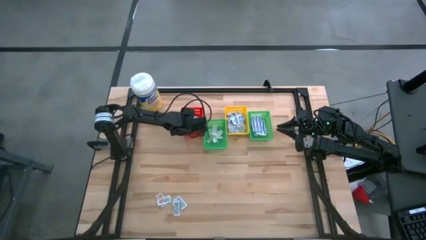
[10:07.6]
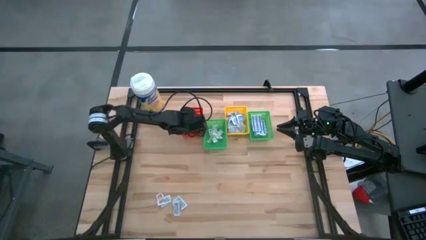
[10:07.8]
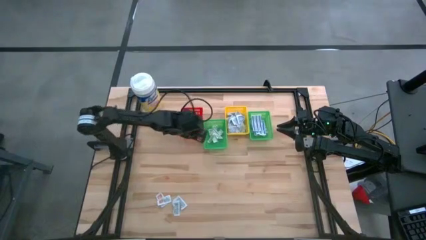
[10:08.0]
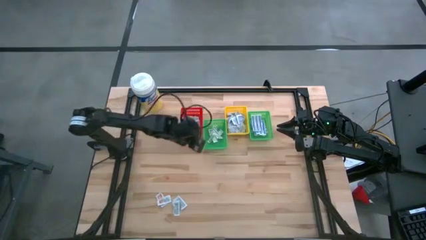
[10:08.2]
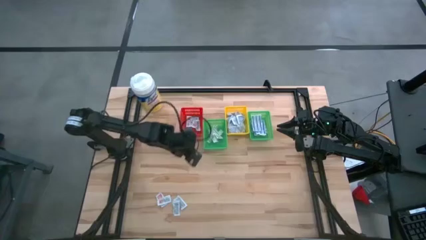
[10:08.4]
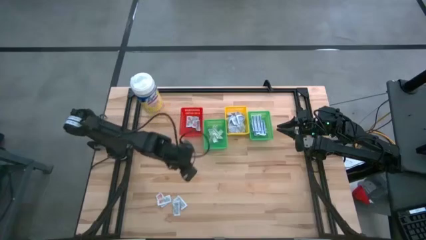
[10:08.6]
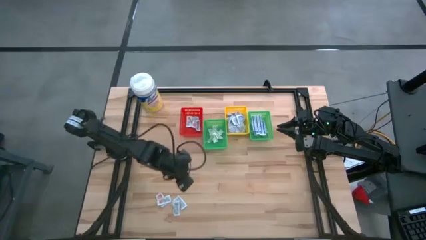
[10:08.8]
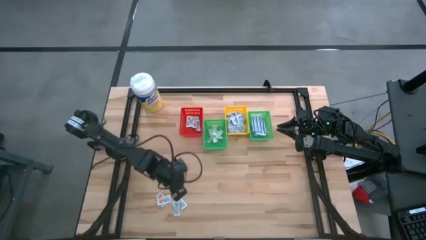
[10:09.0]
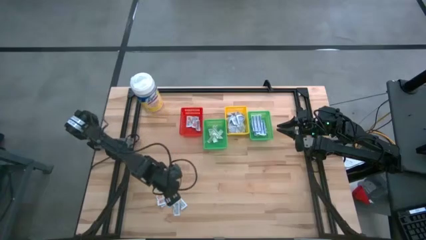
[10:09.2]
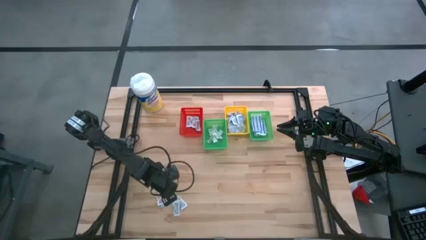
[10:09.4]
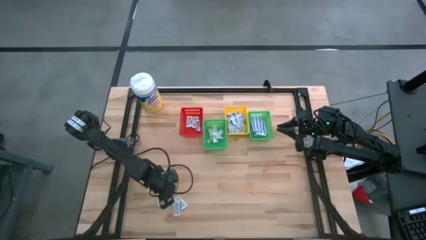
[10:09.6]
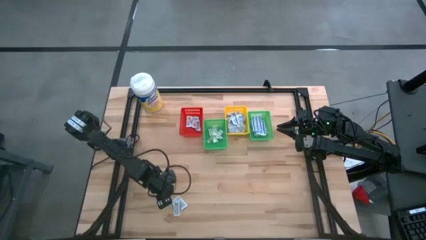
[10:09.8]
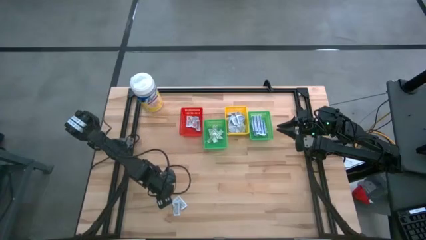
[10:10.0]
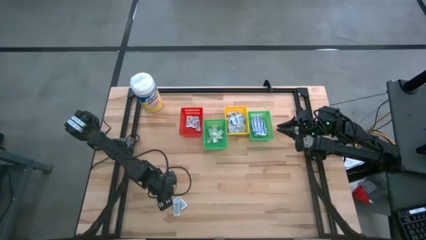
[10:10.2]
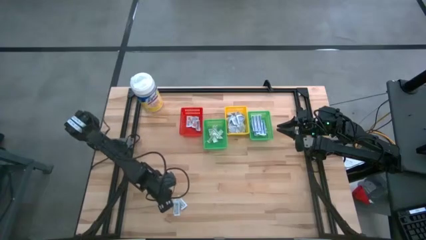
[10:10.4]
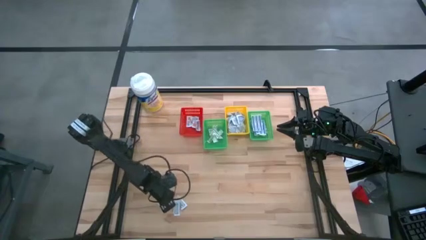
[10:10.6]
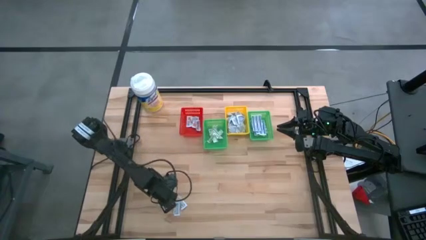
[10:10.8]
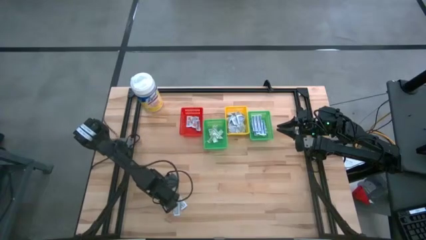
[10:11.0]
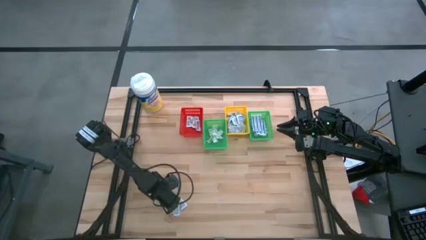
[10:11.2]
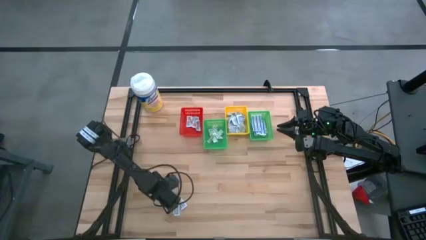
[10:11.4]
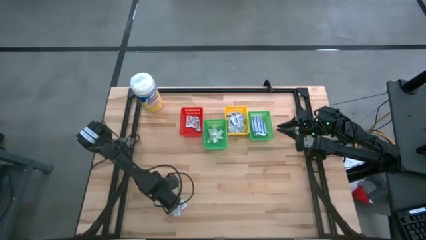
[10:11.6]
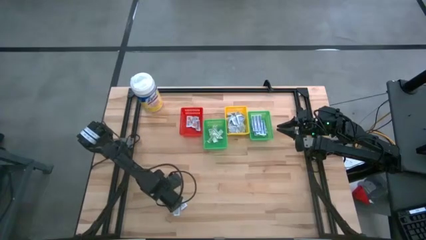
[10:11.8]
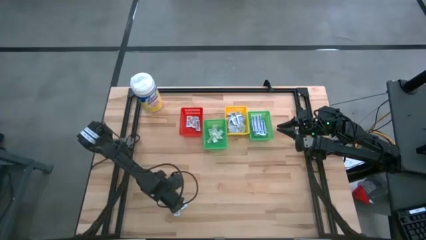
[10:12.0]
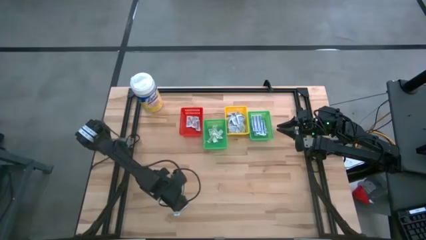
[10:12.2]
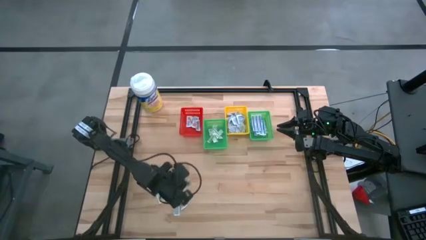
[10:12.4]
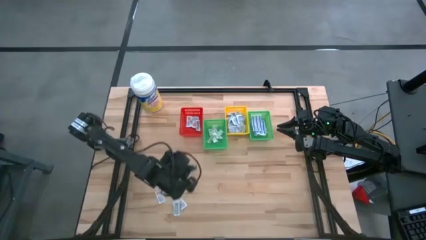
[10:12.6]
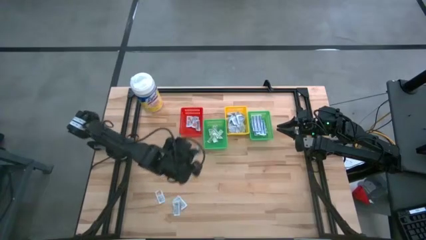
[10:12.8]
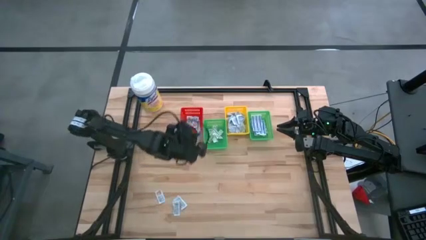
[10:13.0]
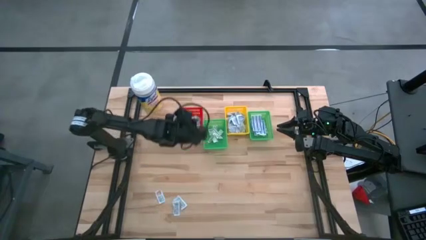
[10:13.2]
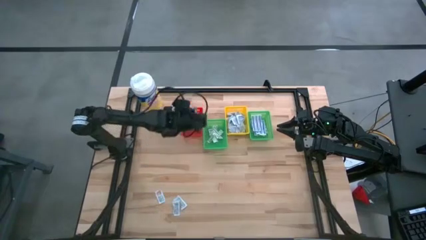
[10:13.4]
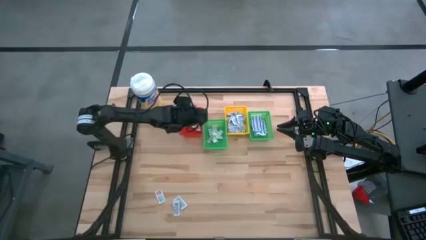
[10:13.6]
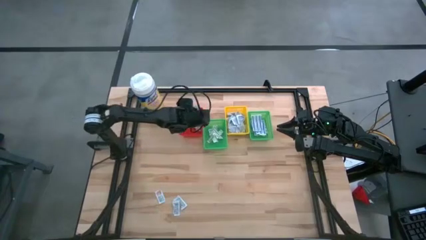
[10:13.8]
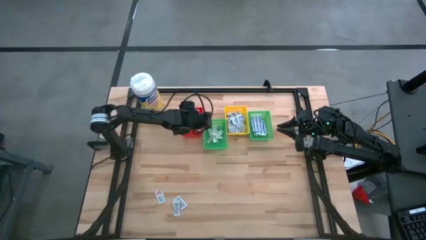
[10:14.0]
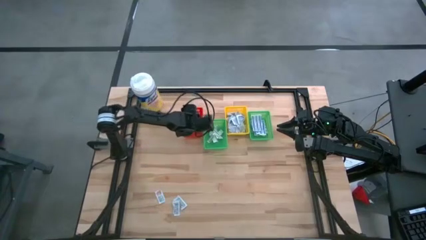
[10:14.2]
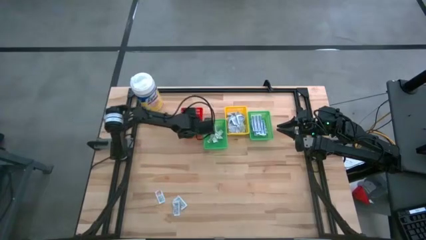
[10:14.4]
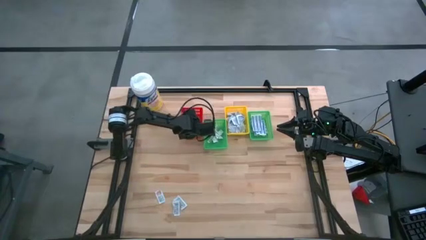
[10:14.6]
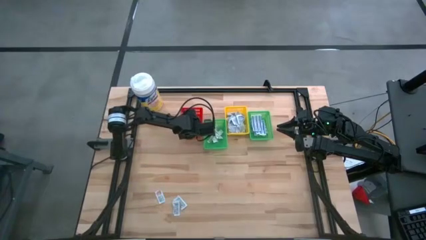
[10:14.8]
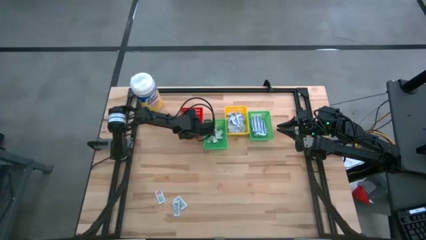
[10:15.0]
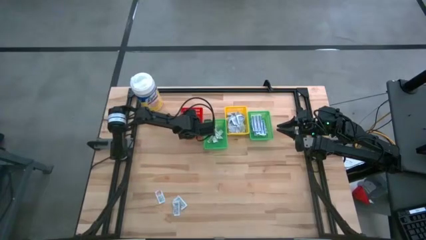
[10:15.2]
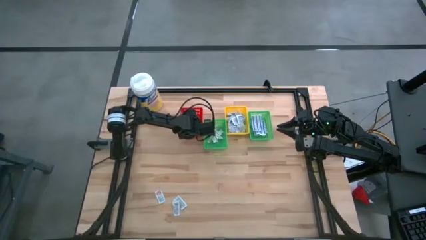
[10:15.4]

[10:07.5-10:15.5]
Task: Pick & Place First Aid Supplies
Put the ointment pack into the red basket

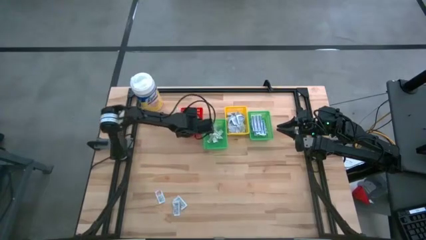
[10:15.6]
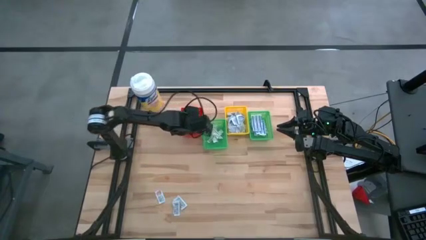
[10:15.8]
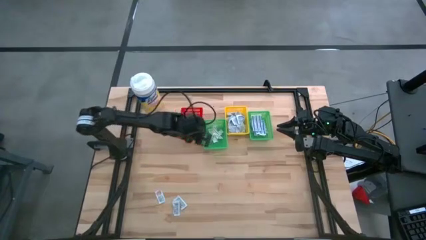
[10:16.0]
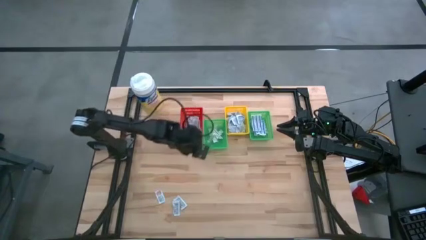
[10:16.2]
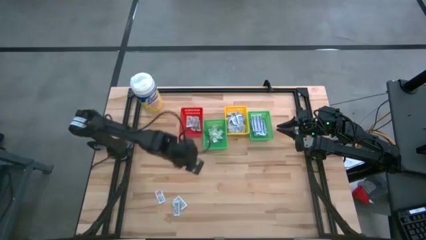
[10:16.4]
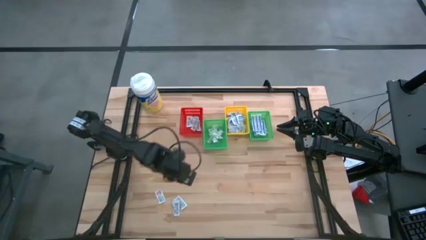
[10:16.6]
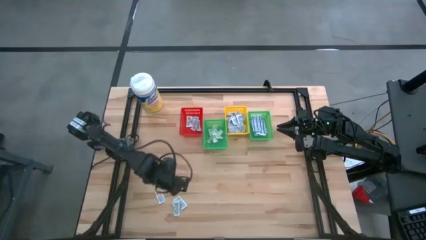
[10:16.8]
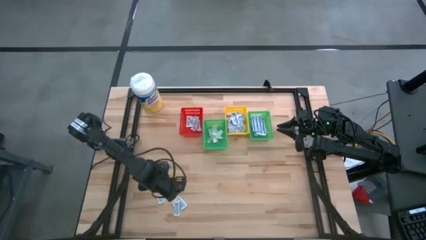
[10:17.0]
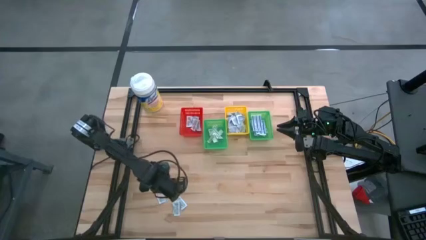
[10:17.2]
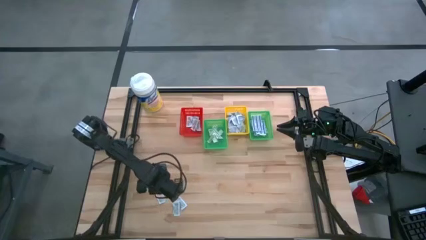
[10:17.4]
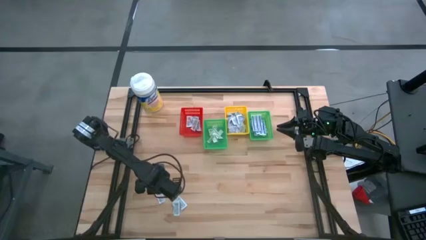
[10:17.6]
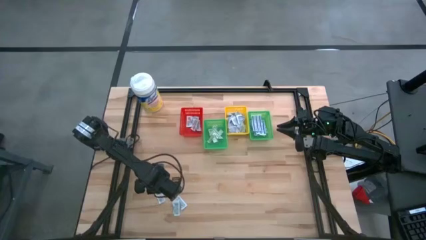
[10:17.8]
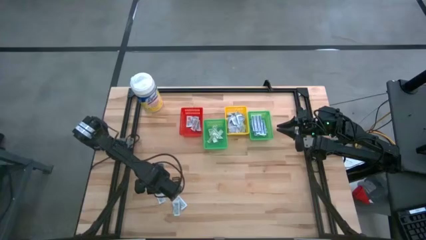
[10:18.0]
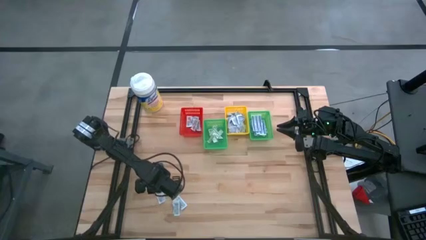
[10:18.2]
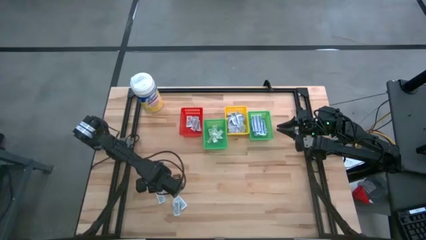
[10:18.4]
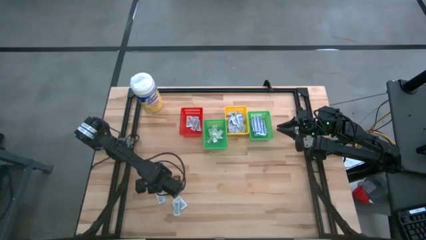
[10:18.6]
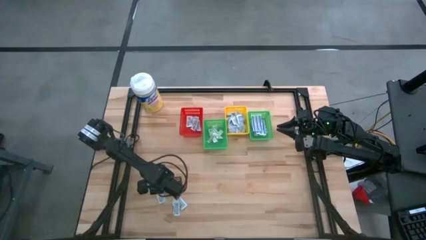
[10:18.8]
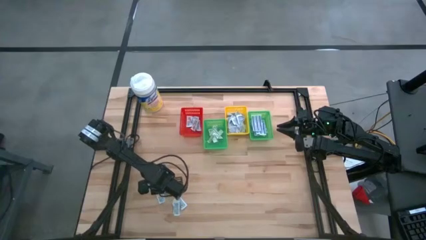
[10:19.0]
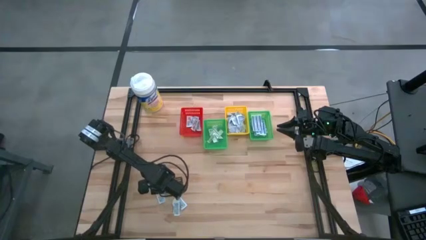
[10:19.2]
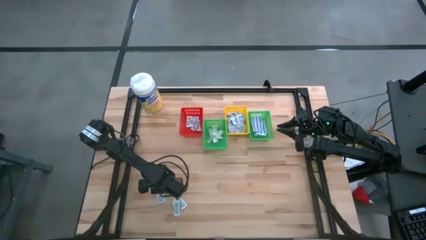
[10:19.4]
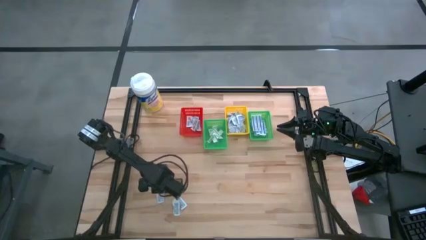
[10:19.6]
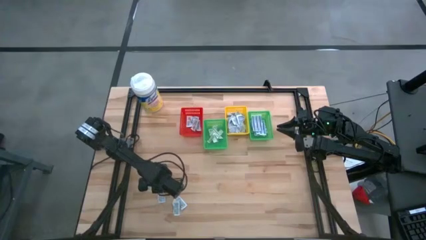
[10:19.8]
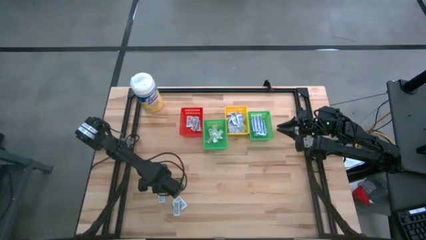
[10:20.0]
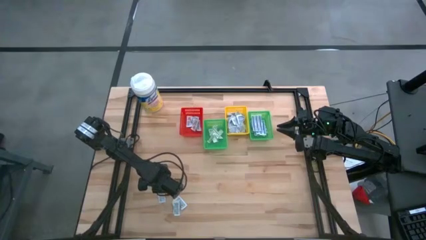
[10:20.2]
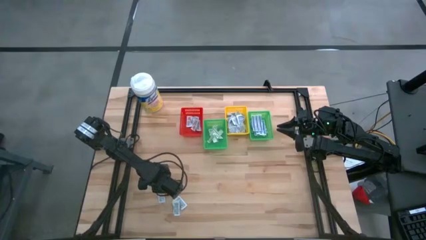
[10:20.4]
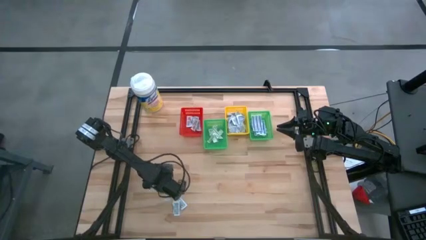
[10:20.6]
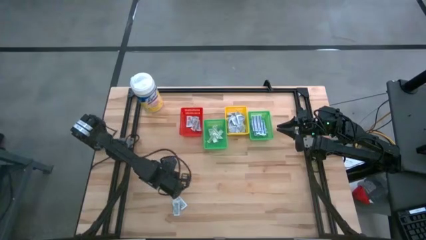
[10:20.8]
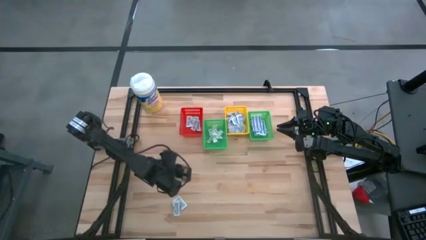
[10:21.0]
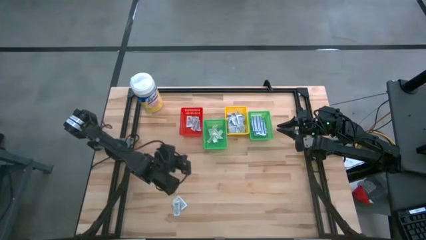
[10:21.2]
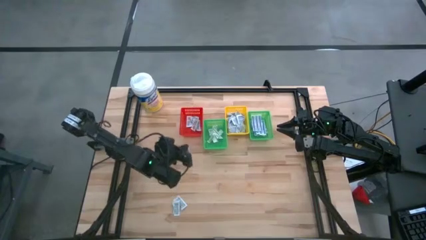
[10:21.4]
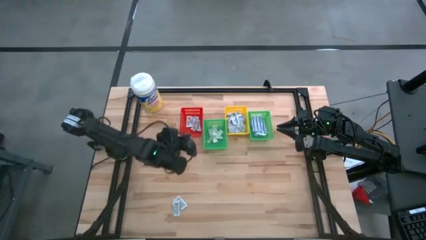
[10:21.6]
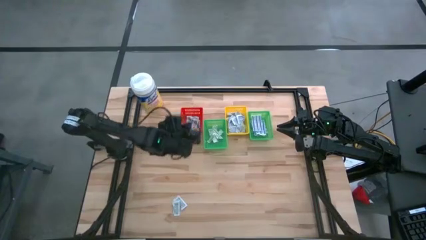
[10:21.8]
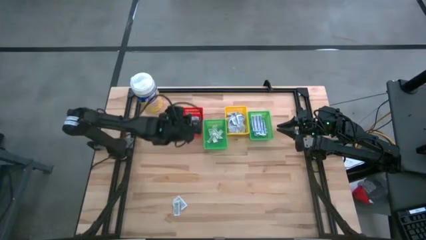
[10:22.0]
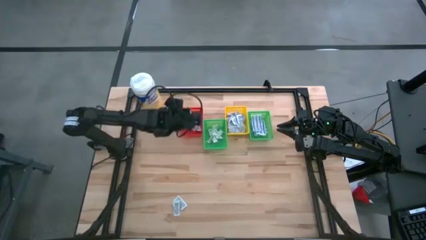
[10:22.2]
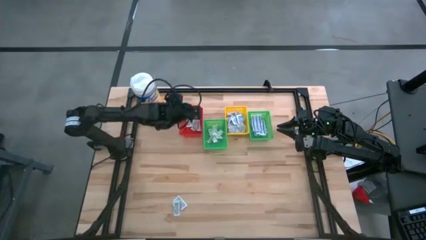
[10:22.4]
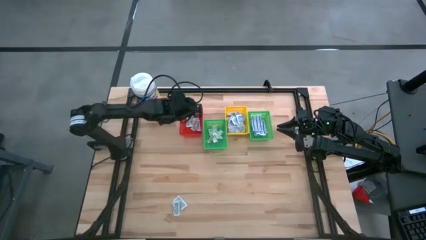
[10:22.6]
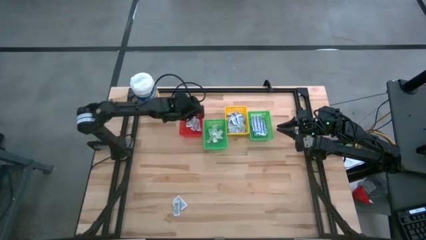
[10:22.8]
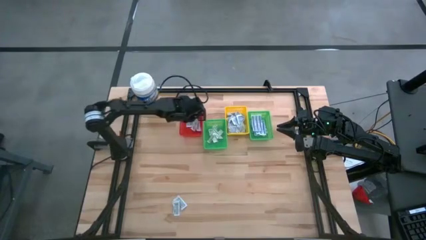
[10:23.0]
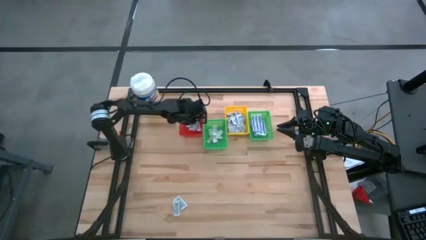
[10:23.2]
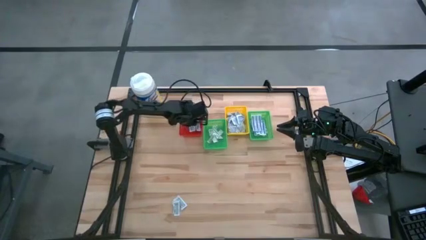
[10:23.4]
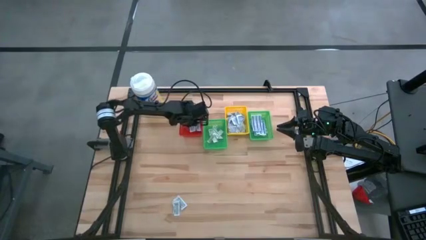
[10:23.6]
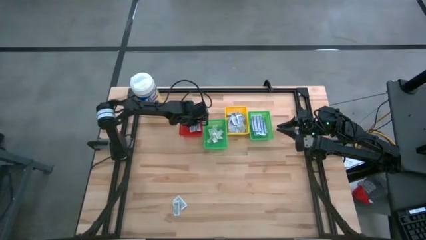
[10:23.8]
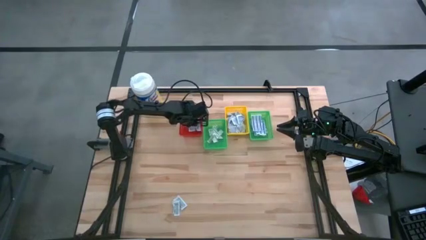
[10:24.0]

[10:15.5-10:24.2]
Put the ointment pack into the red basket
